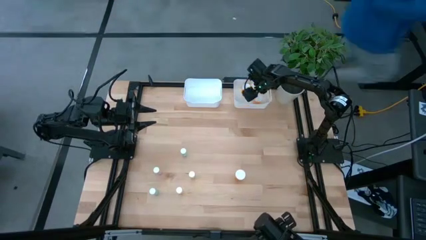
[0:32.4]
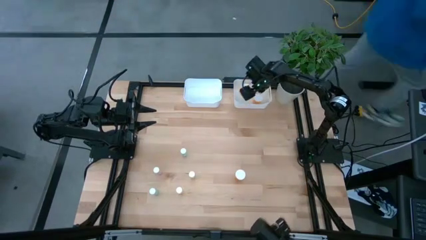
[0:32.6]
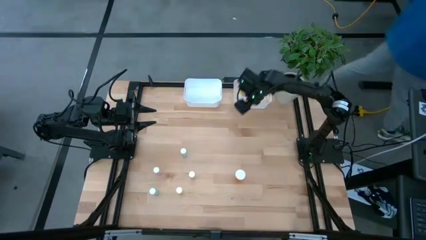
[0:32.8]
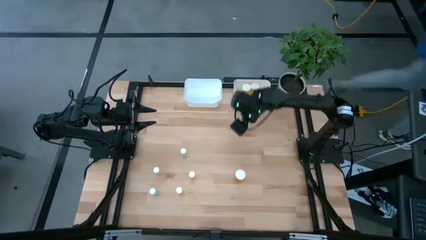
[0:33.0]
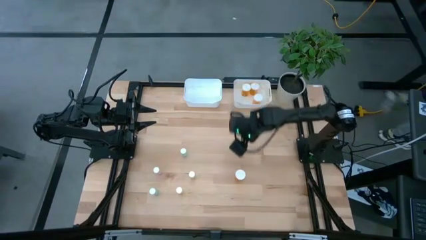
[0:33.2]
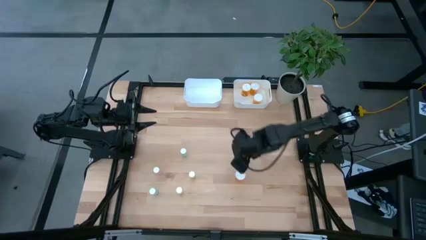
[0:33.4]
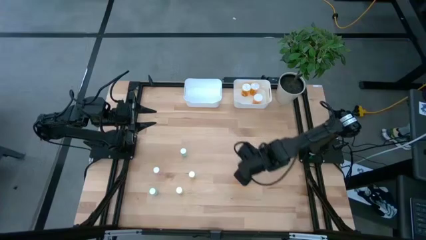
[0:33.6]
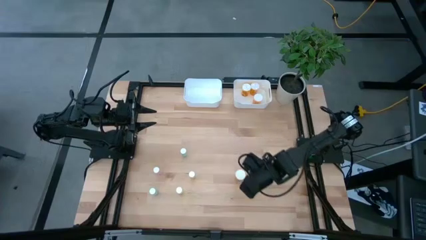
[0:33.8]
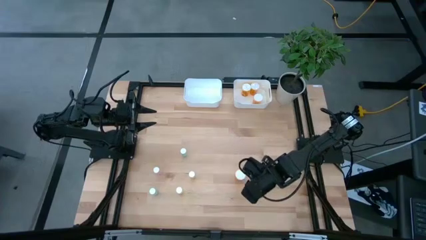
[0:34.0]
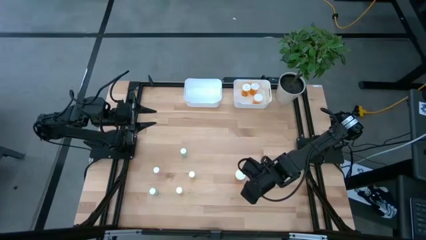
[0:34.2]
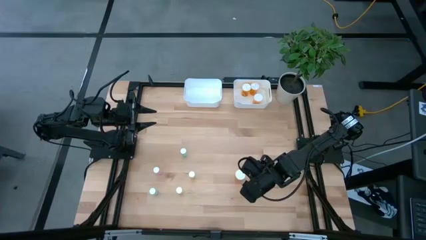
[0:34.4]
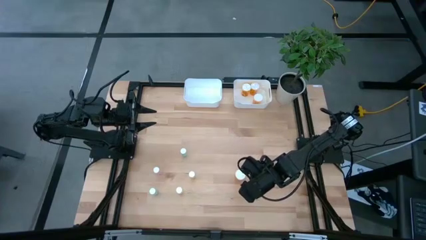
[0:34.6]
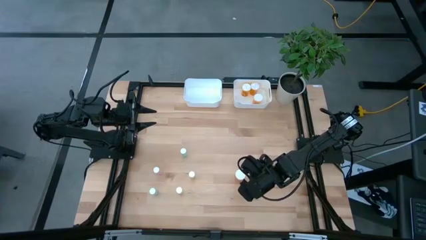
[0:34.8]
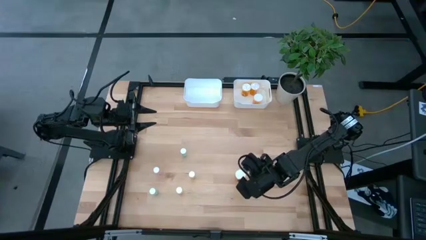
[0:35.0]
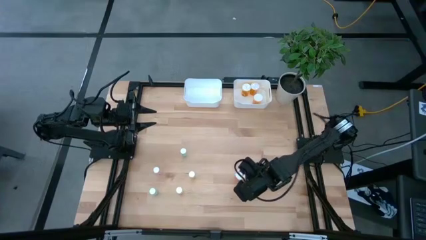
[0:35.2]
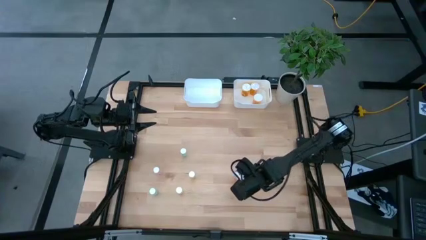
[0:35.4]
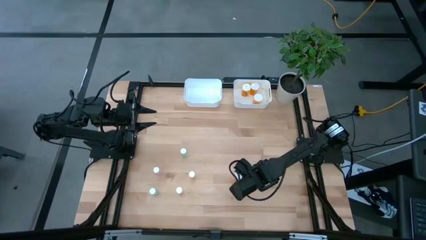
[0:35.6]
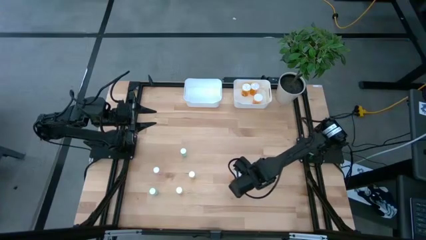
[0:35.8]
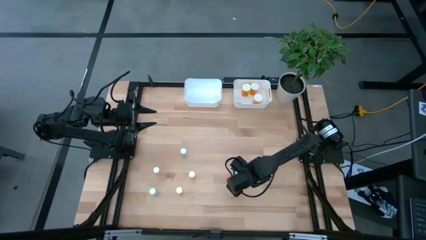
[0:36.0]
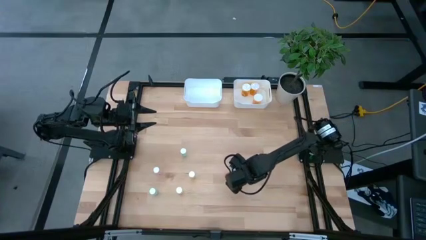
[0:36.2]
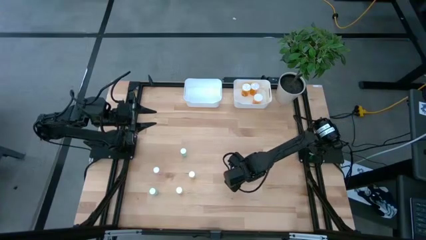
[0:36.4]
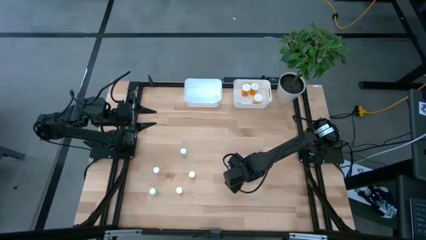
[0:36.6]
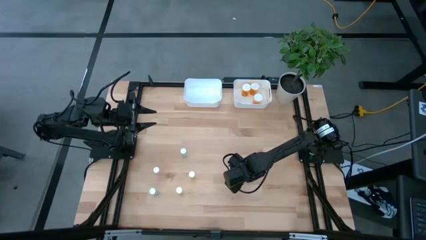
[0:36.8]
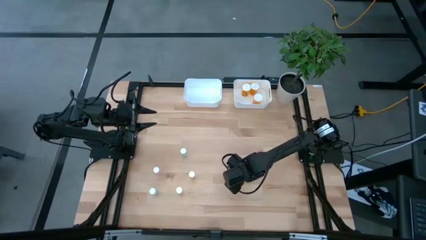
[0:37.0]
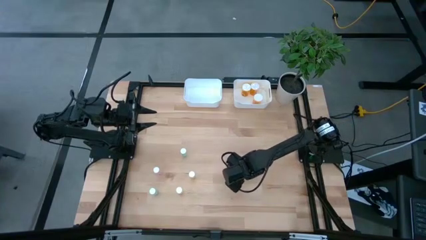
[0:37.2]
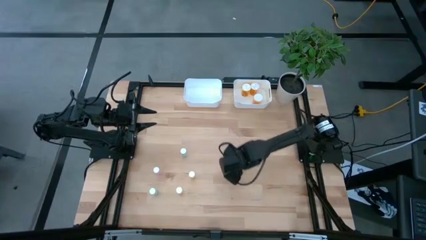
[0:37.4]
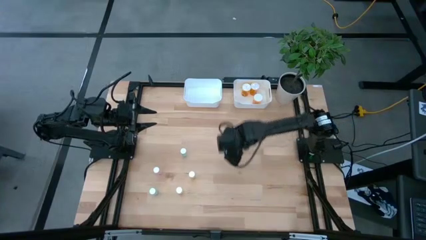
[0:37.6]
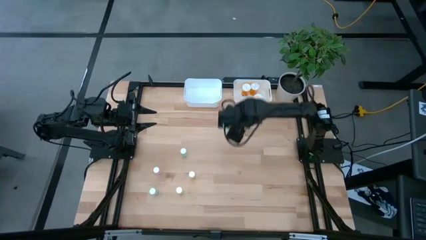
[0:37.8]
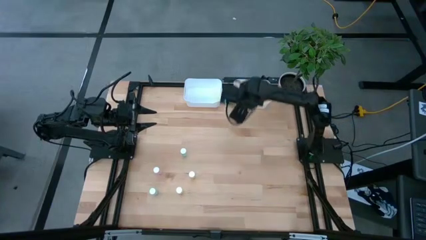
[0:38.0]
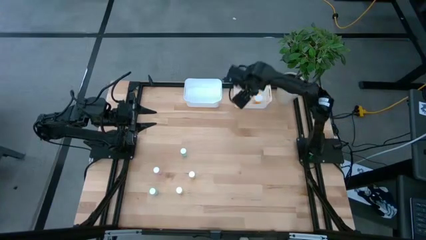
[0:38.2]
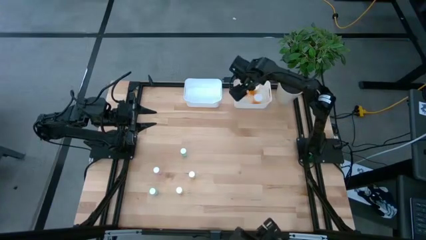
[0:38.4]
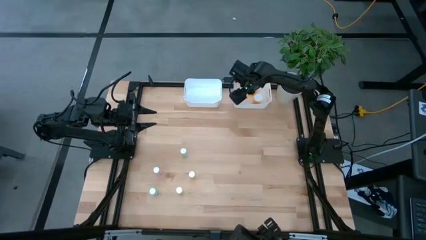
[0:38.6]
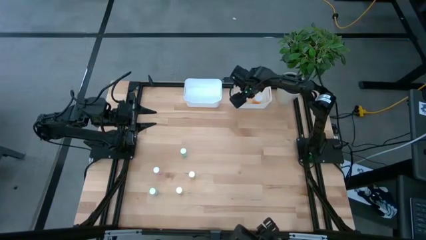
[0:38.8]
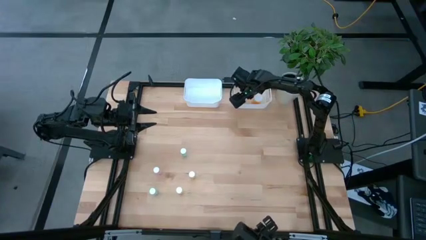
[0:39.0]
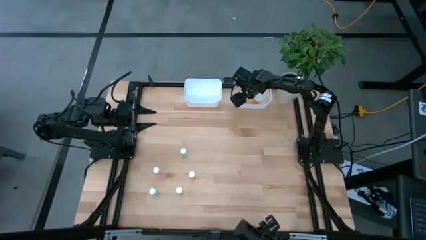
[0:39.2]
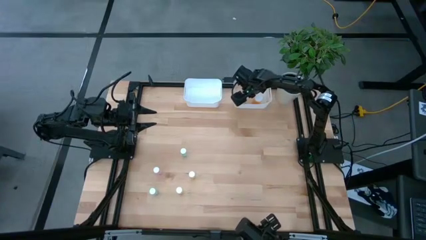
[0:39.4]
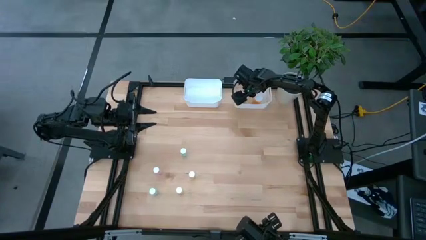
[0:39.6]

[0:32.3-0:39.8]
Task: Pick and place medicine bottles into bin by pill shape (circle, oval)
Put the orange pill bottle into the right white bin

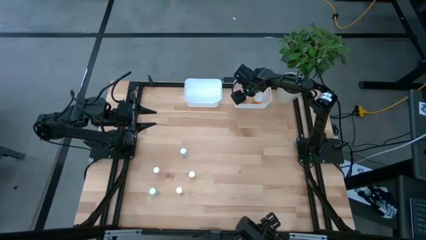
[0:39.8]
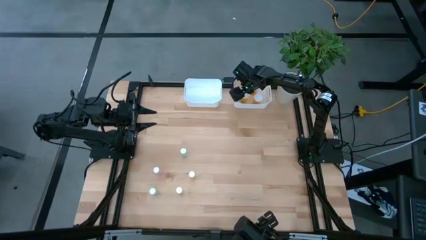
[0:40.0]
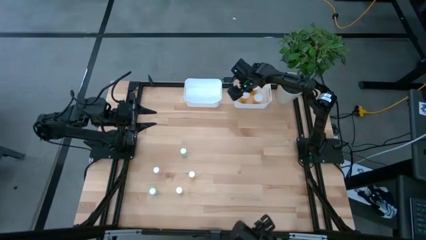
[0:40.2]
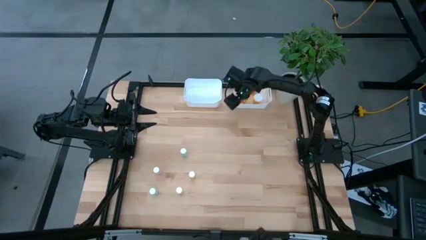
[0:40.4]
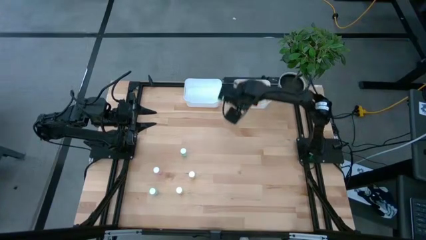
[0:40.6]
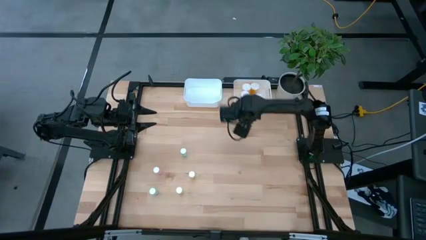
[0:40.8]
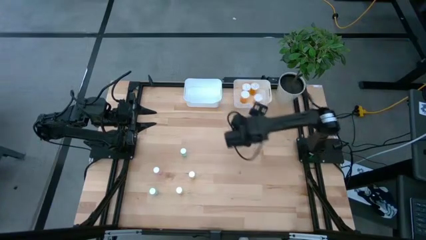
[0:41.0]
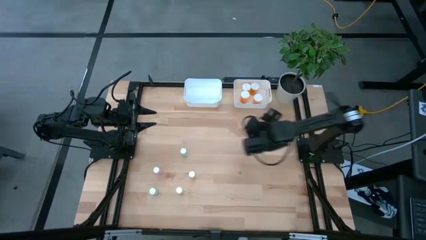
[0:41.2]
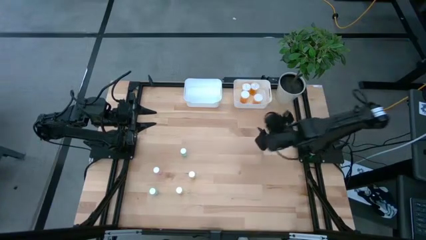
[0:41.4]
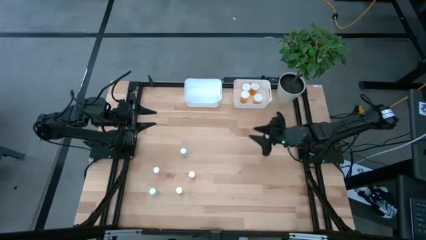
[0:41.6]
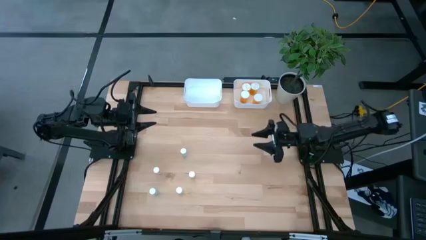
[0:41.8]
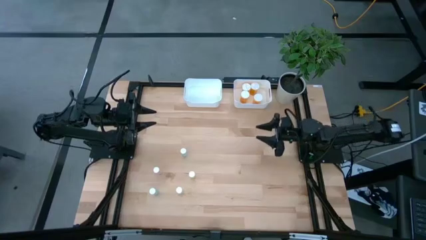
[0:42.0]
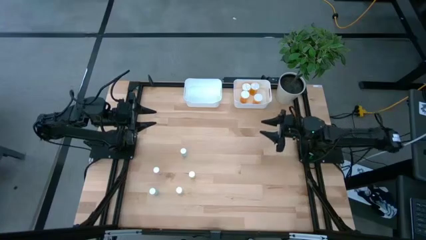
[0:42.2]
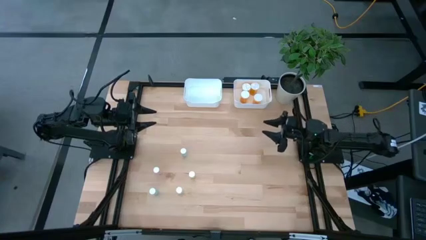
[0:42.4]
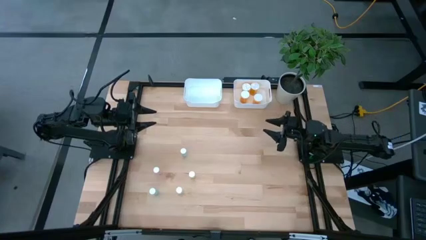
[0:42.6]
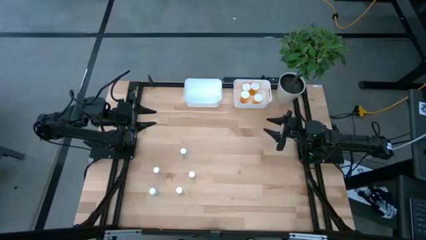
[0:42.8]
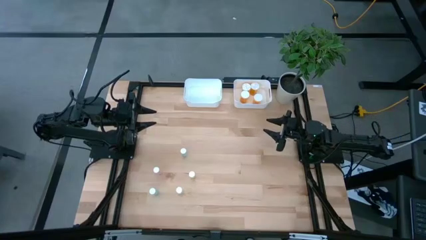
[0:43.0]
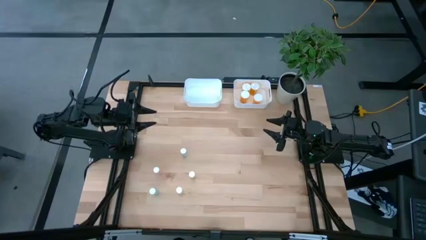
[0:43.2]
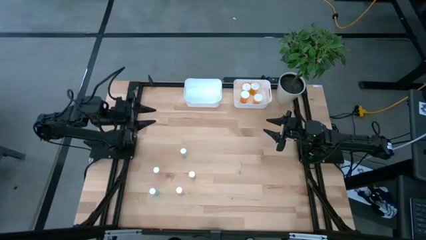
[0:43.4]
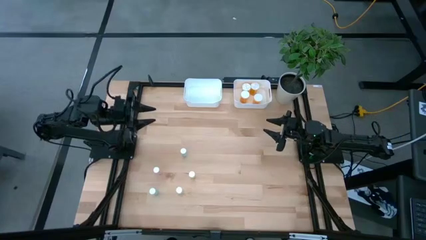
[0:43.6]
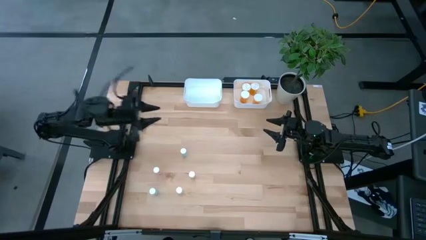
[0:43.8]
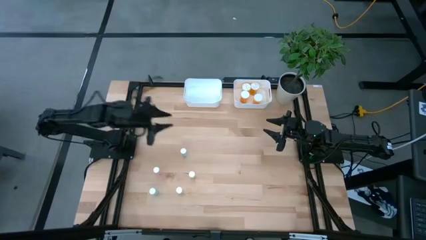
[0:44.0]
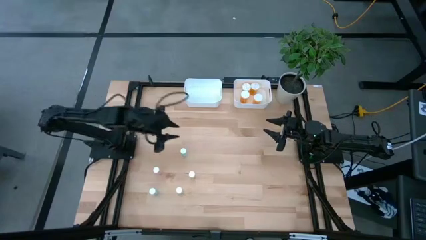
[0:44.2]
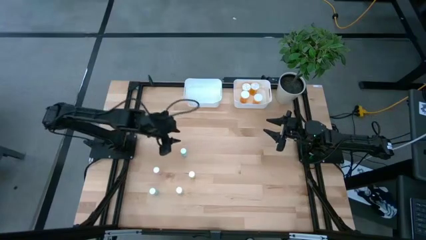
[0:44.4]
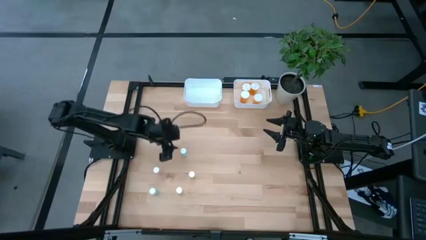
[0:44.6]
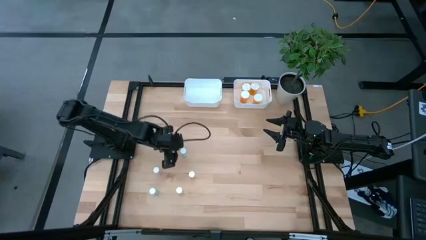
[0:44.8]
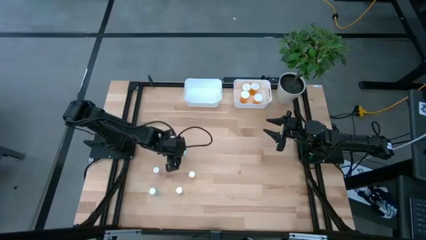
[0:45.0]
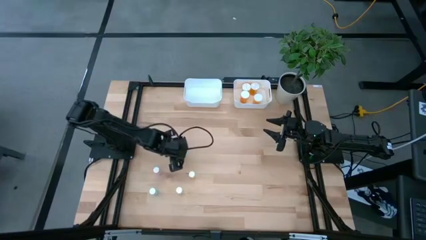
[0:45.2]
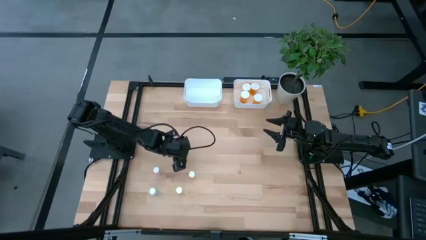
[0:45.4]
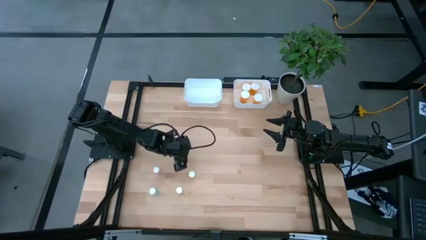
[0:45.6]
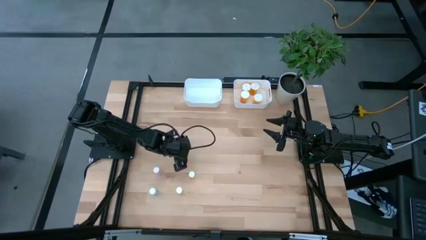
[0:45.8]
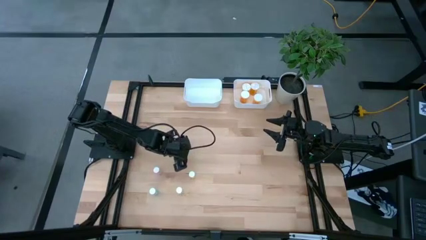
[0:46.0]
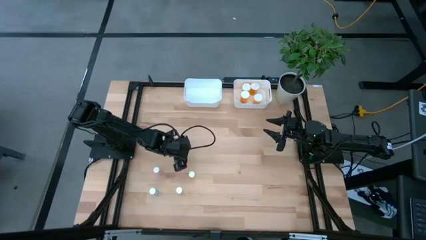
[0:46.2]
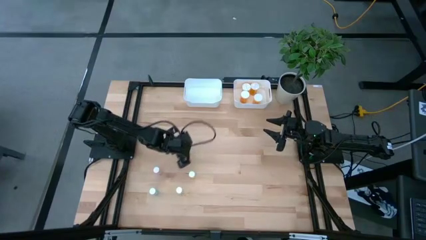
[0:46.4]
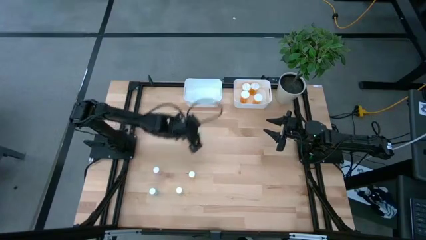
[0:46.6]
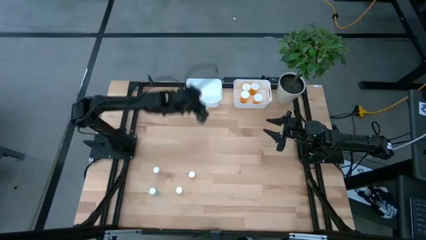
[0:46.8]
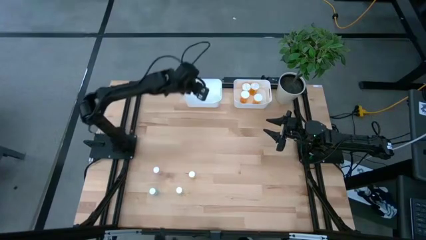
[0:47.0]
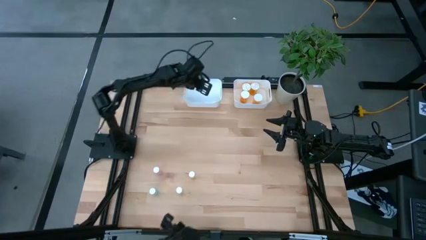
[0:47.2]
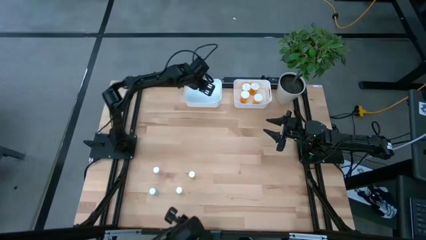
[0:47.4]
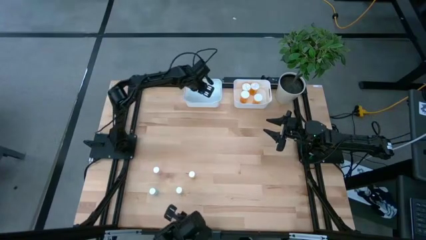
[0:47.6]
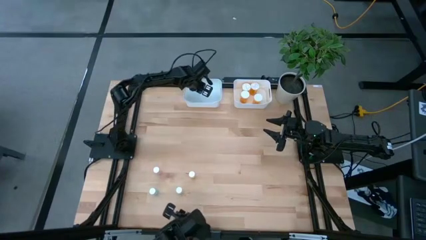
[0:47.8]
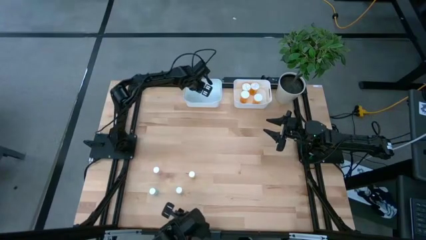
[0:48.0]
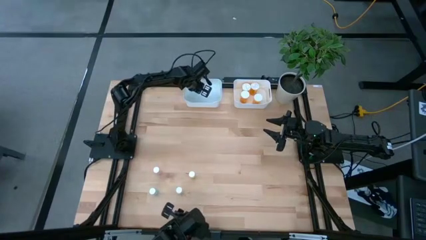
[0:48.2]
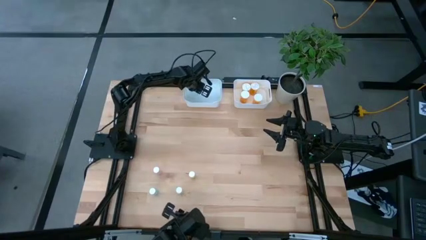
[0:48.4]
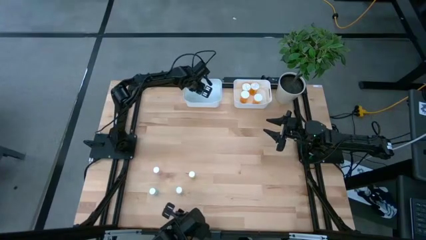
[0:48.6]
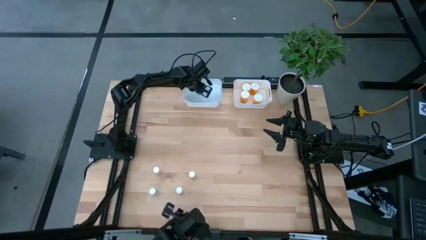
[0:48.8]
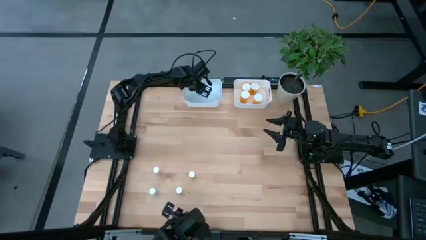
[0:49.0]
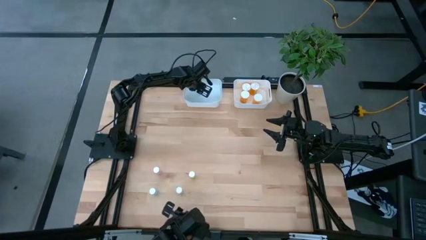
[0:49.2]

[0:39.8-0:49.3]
Put the blue tablet bottle into the left white bin

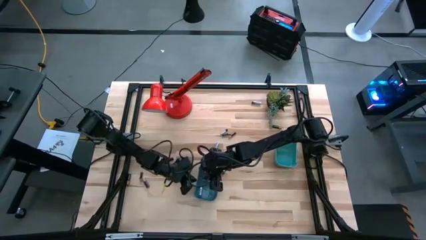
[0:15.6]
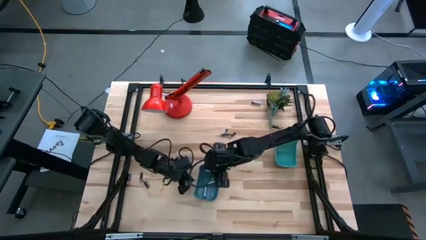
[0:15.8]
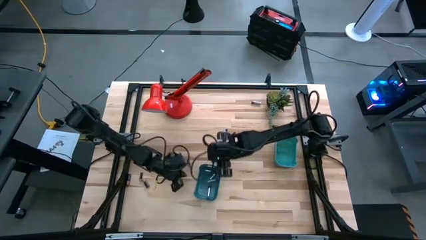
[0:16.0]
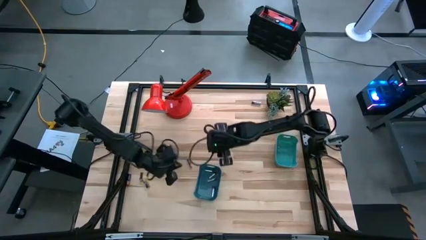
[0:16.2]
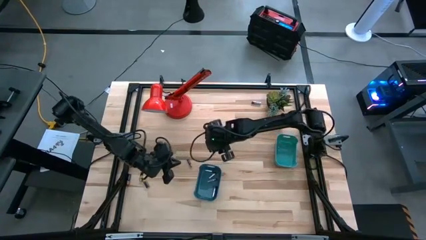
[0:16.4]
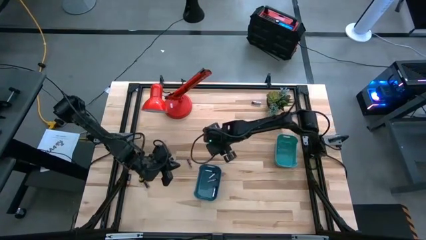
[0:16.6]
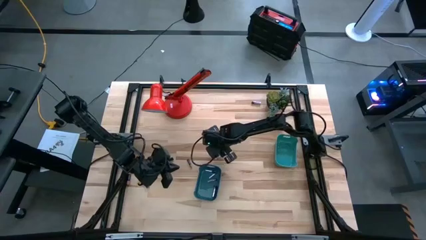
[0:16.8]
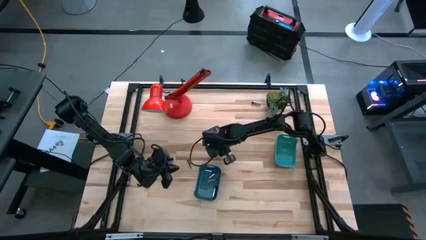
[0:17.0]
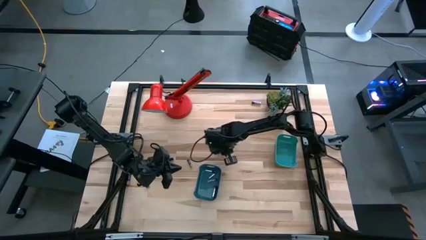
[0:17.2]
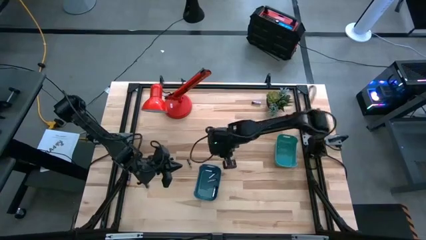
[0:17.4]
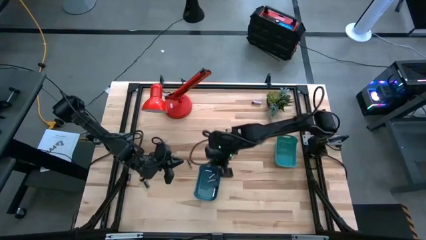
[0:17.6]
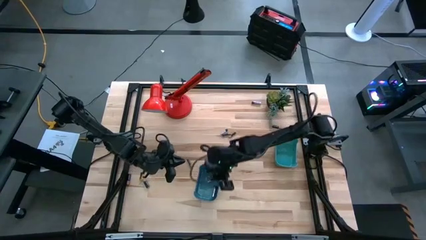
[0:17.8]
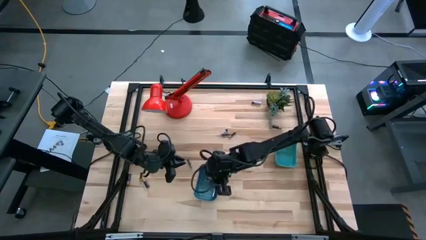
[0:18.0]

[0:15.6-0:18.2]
Task: Sort batteries
Put the silver battery into the blue bin
